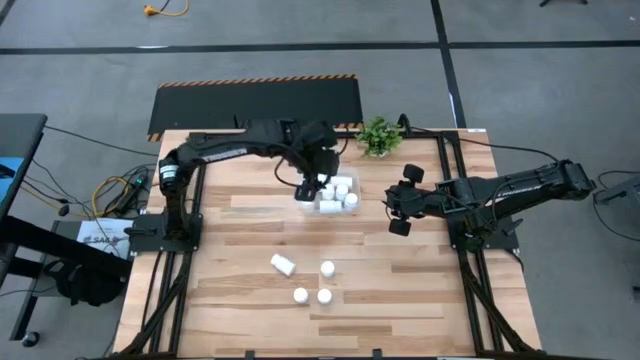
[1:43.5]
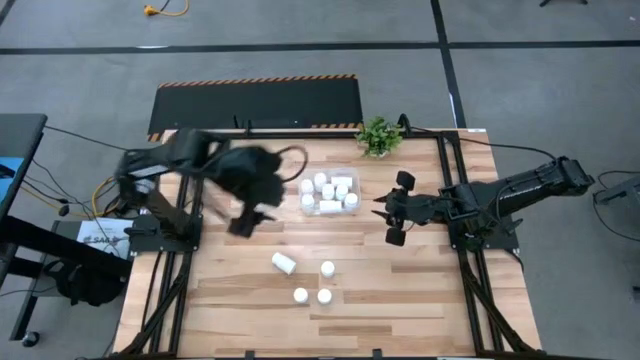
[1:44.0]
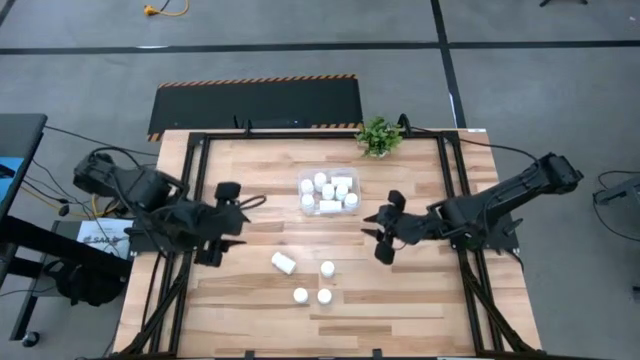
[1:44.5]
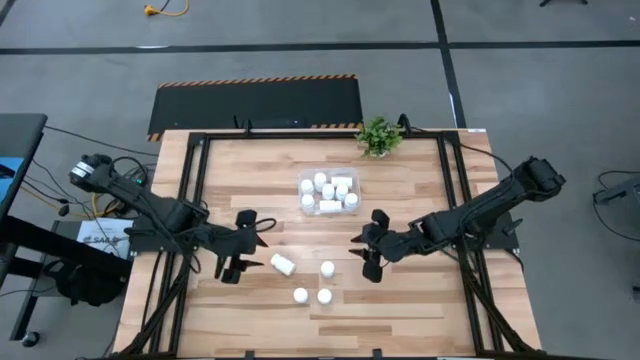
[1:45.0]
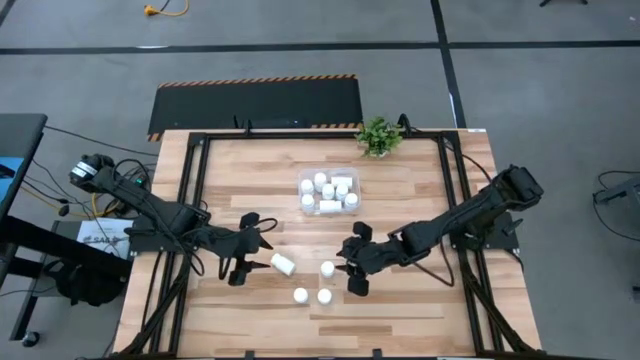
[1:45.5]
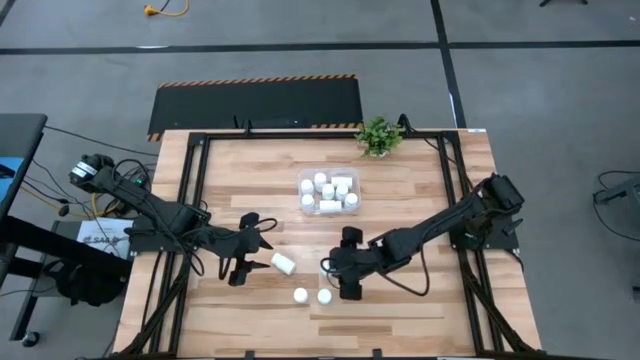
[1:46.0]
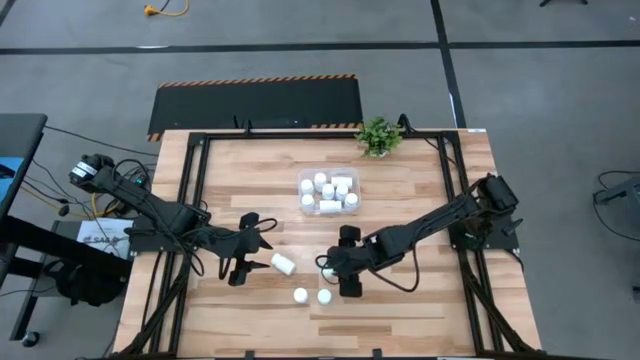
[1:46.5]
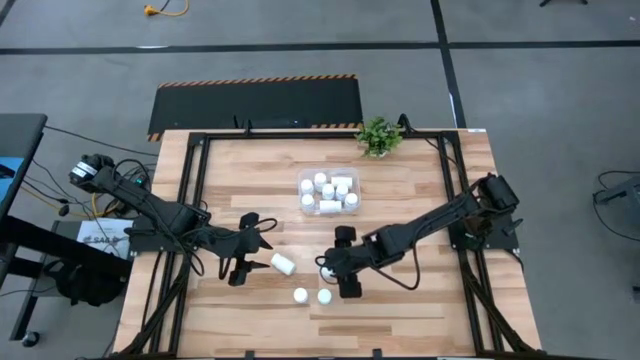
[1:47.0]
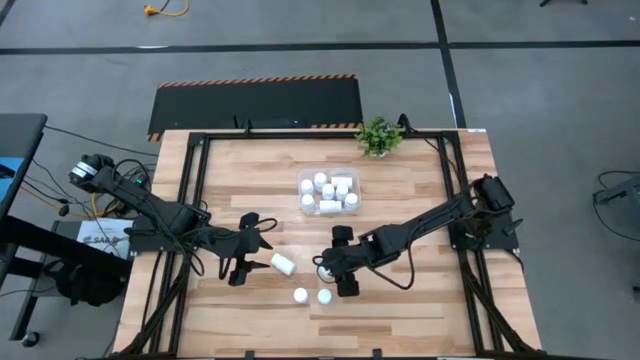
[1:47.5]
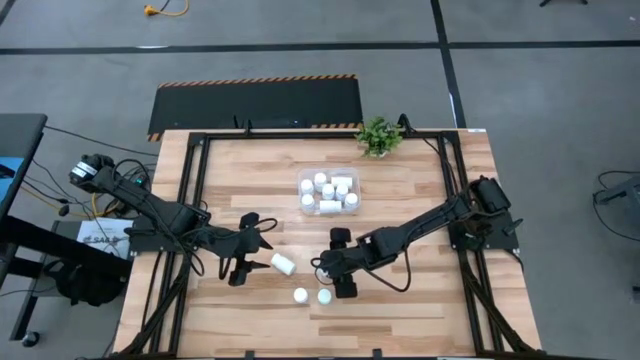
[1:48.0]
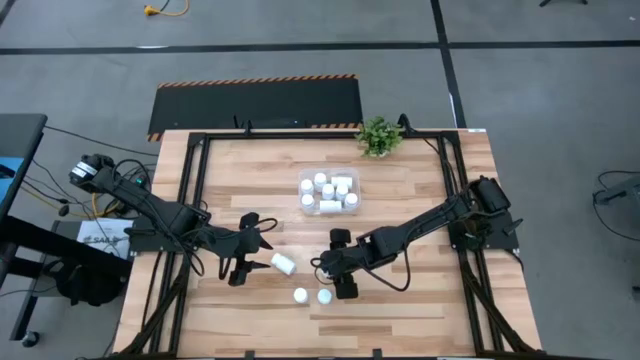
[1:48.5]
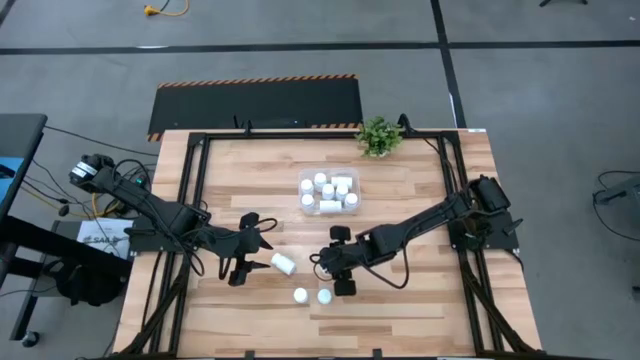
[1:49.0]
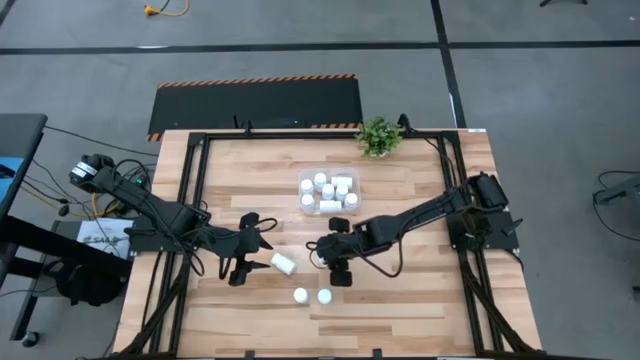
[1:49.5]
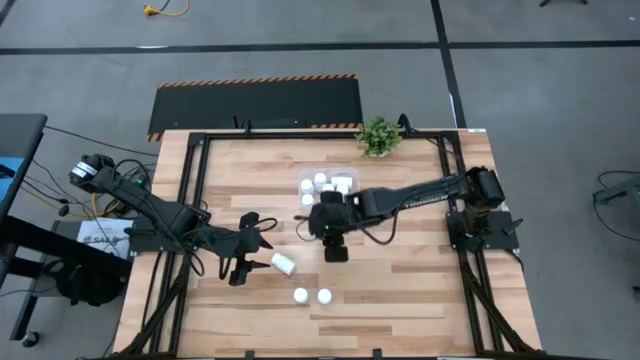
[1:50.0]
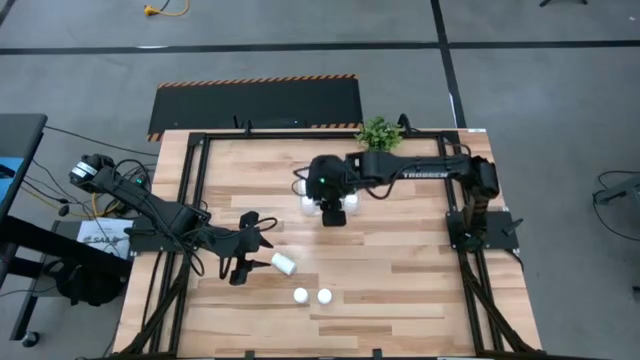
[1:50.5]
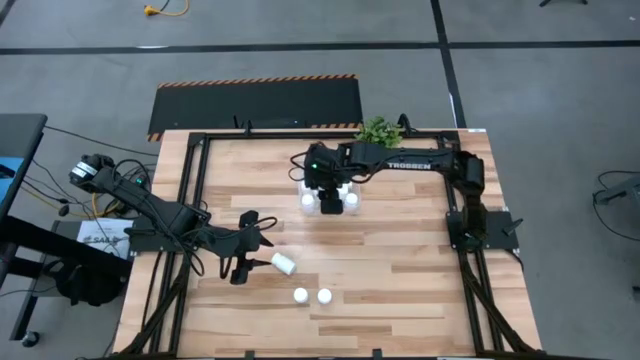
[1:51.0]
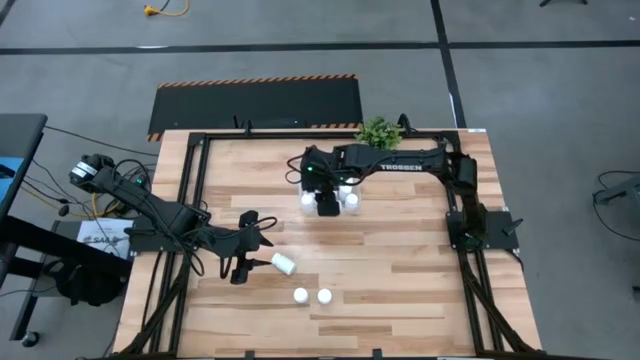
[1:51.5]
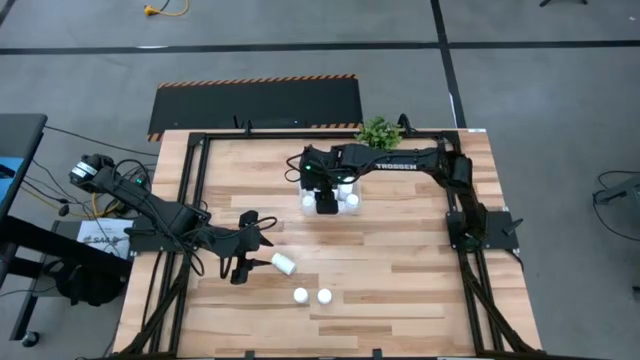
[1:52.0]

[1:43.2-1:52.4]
Task: Pick and place pill bottles into a basket
Put the white medicine bottle into the transparent bin

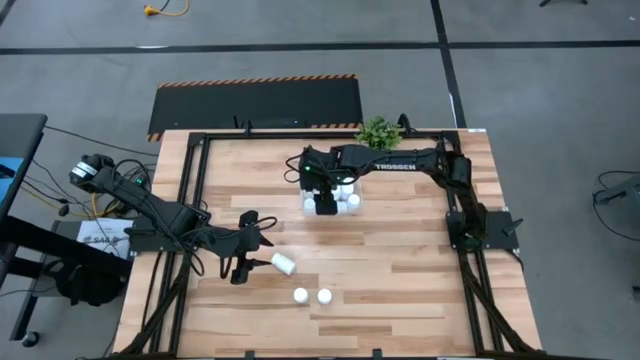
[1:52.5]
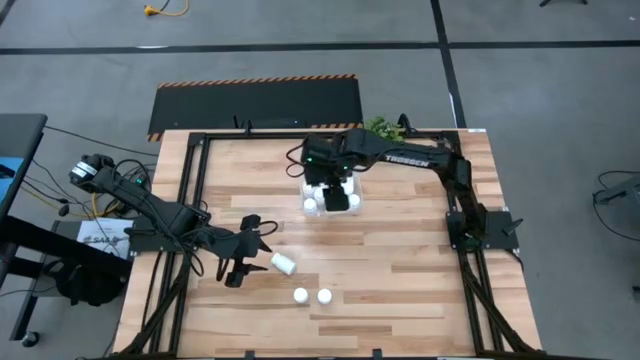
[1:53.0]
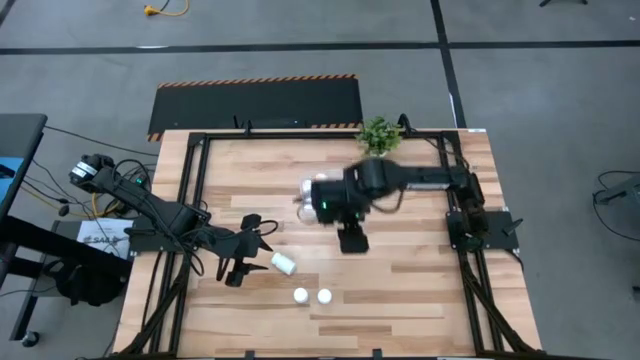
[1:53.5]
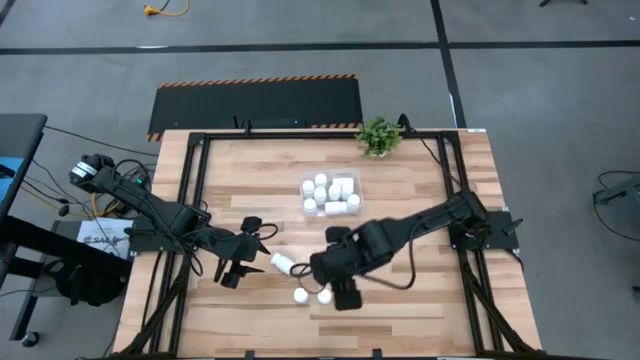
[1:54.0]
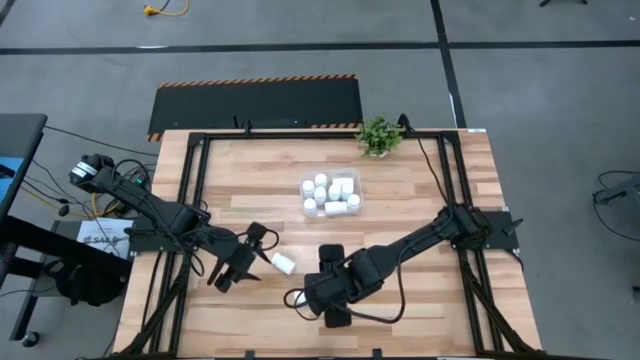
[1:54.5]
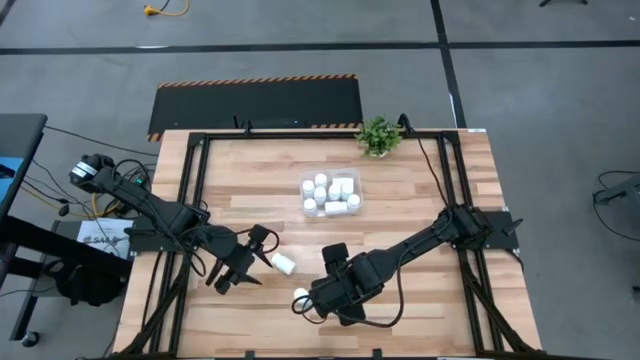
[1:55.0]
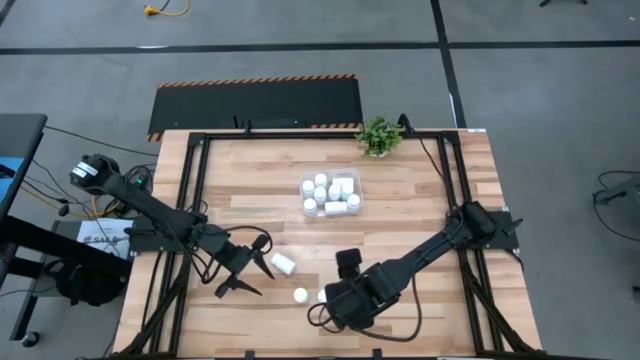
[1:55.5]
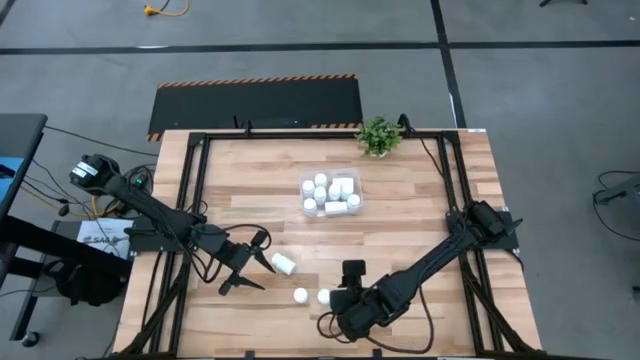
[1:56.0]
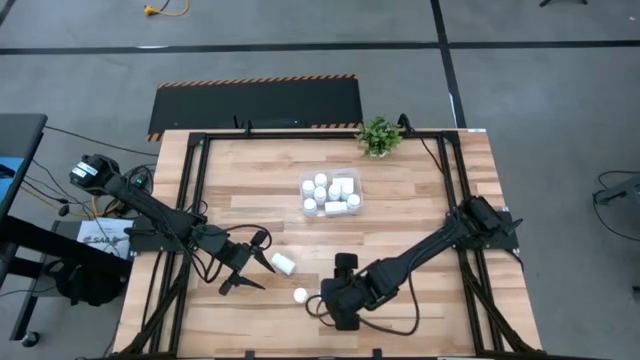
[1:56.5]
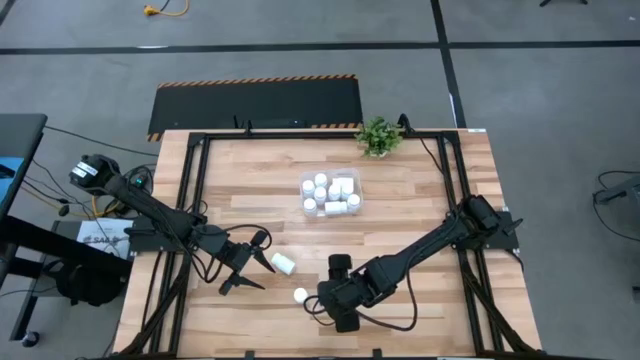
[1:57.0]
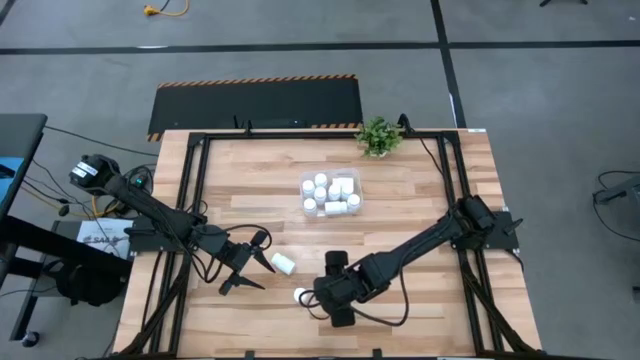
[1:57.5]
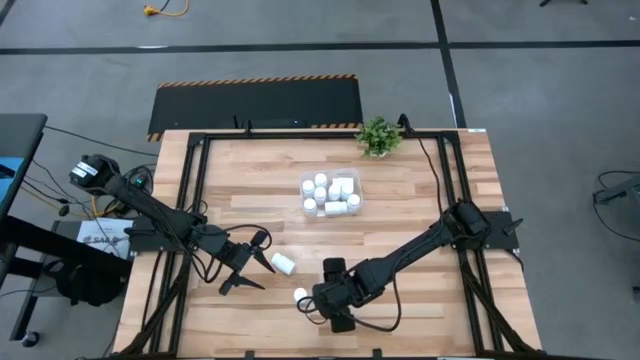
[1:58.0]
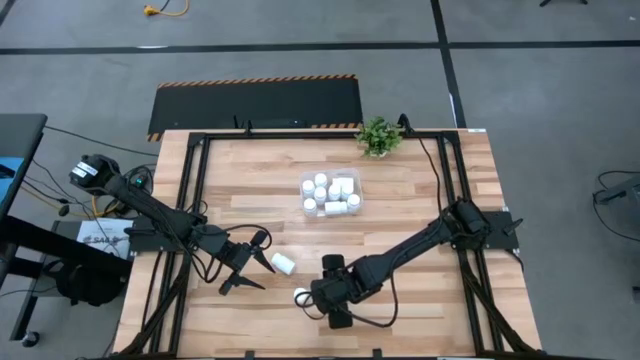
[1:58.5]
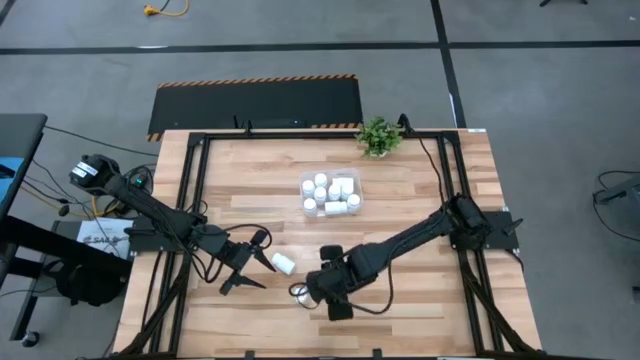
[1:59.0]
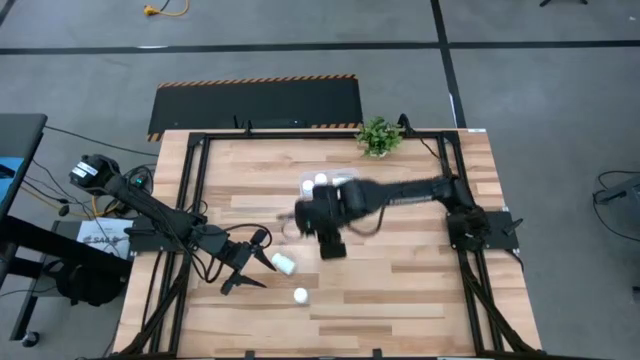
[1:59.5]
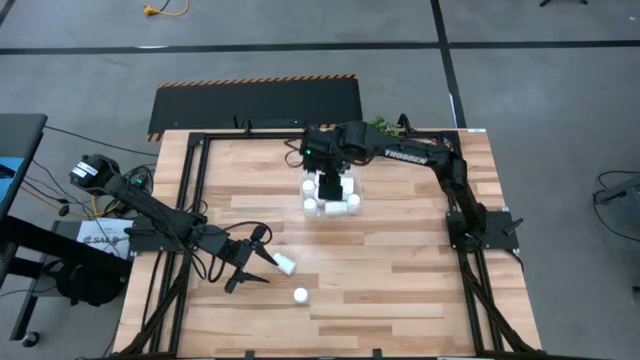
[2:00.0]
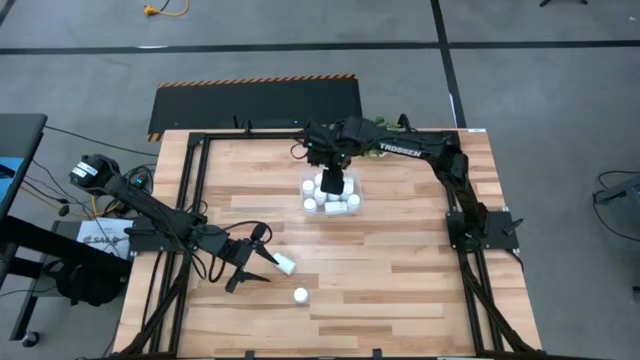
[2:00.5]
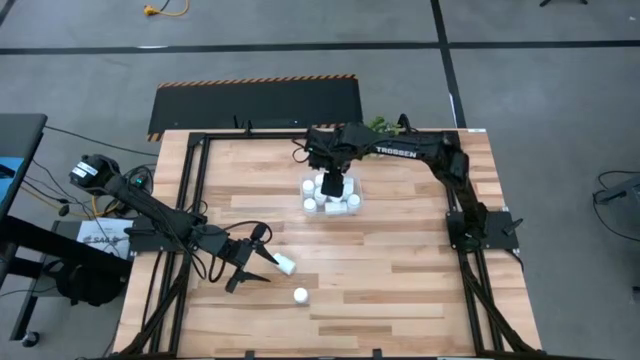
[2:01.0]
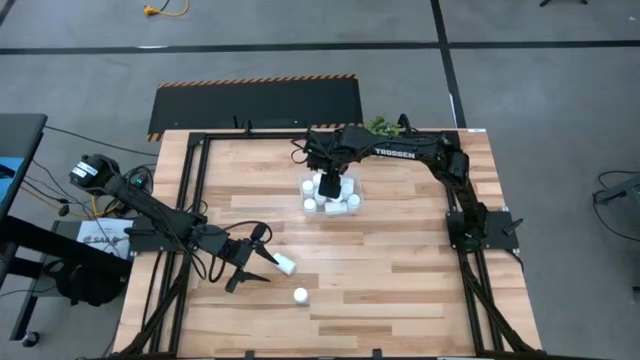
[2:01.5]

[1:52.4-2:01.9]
Put the white medicine bottle into the transparent bin

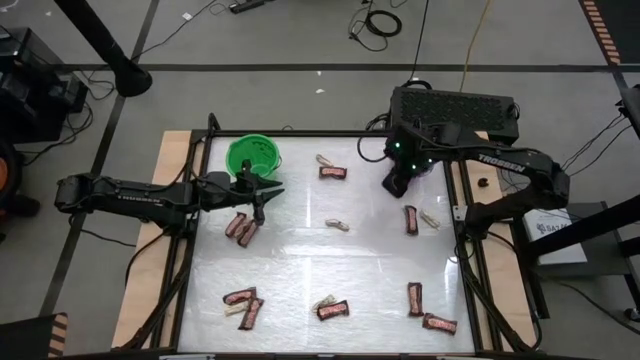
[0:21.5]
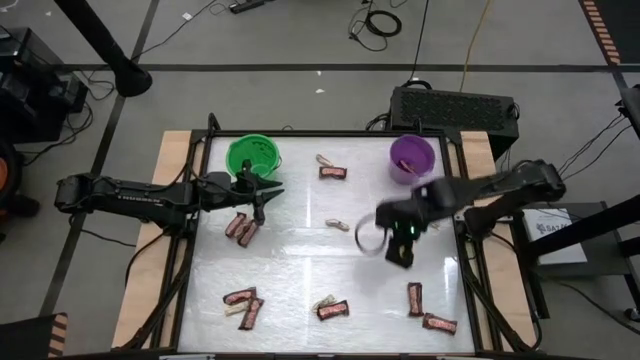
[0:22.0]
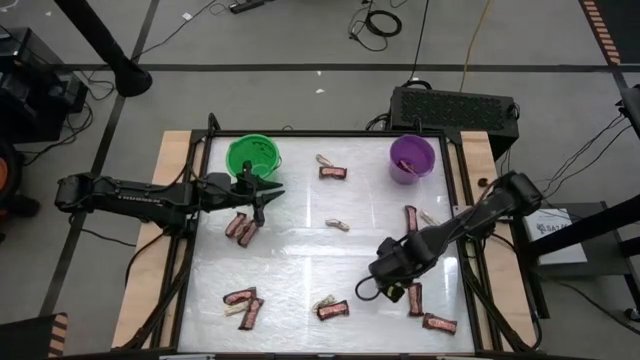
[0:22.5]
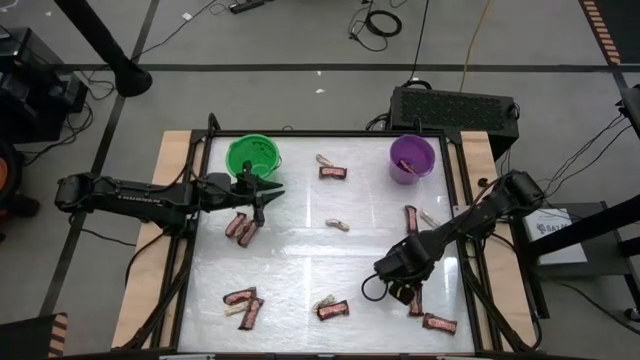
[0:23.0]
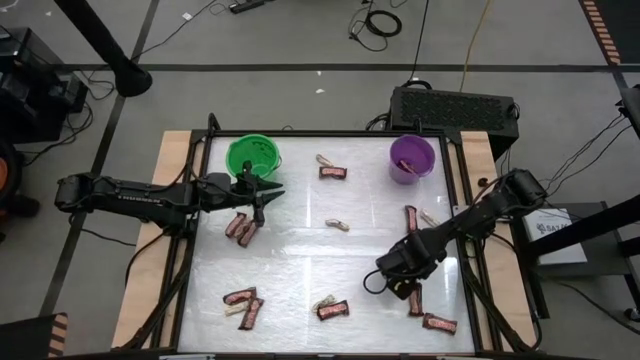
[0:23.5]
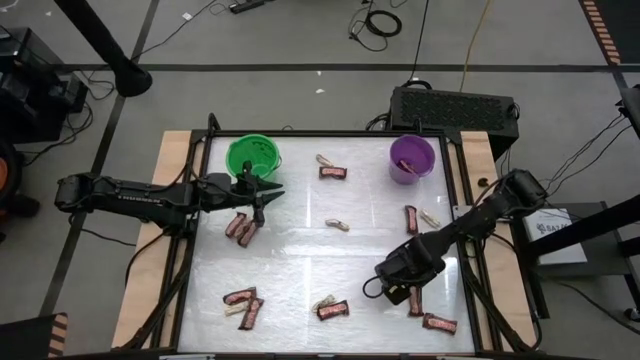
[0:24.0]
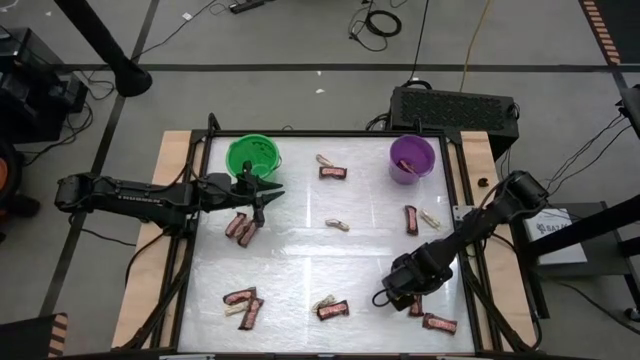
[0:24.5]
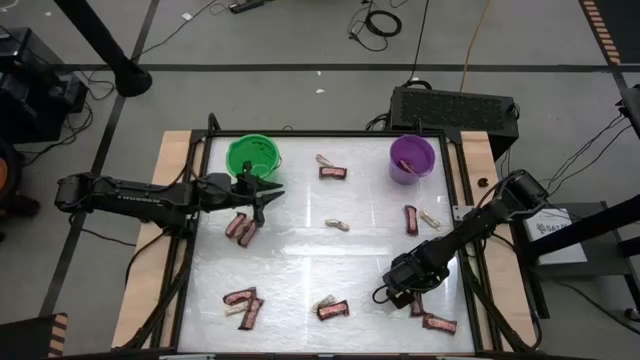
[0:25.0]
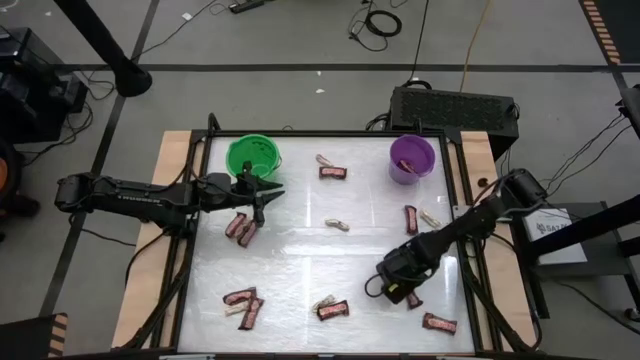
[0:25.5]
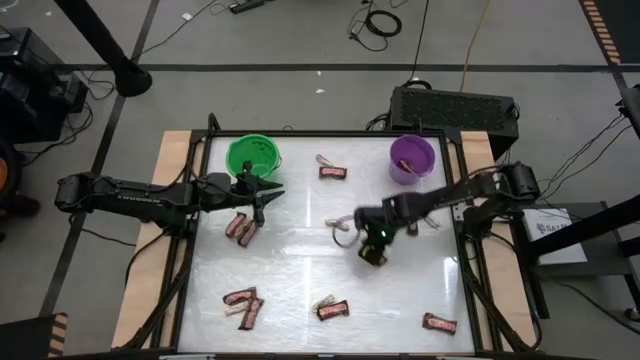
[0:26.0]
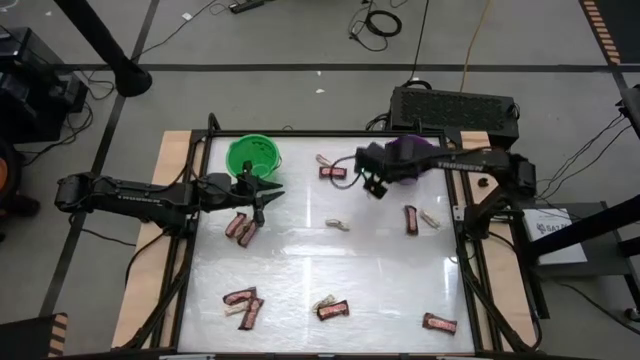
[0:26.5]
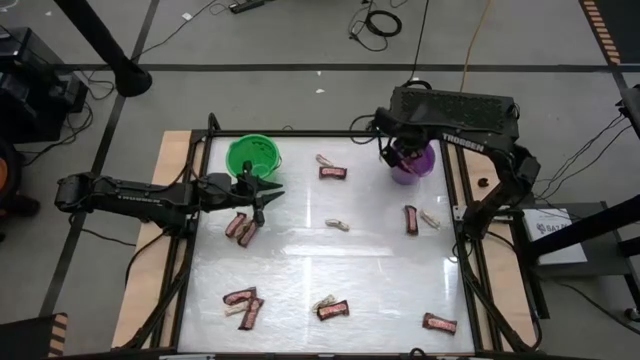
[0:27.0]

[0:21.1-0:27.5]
Task: Sort candy by brand, put in halloween buckets
Put the brown chocolate bar into the purple bucket
